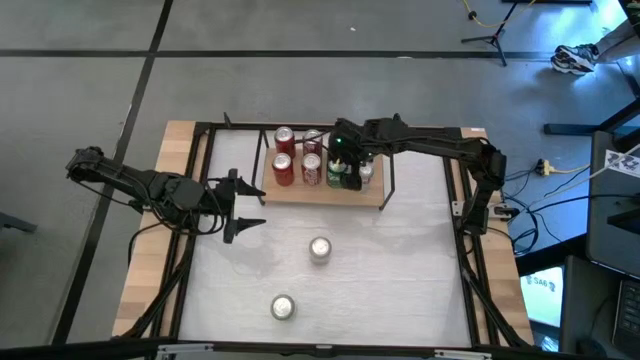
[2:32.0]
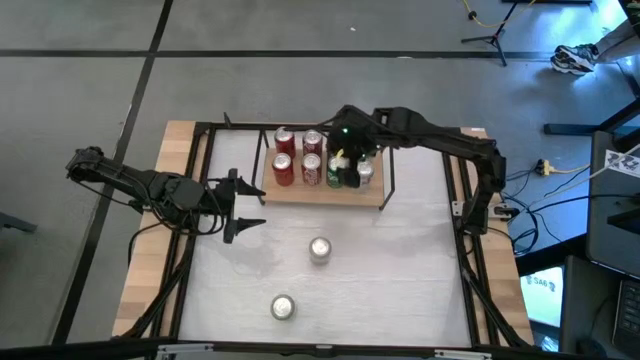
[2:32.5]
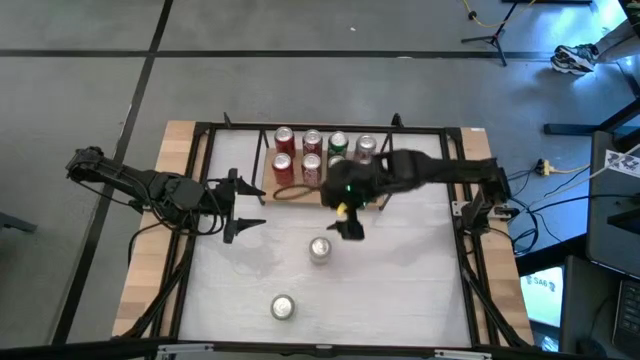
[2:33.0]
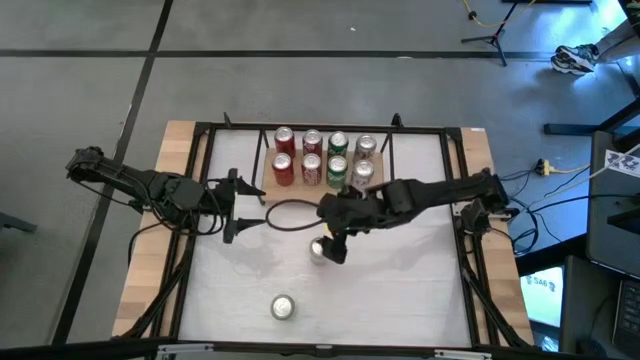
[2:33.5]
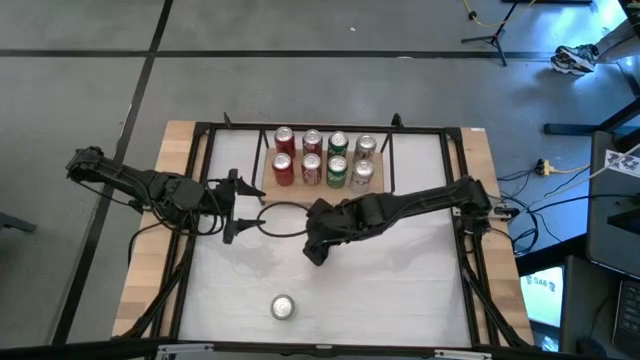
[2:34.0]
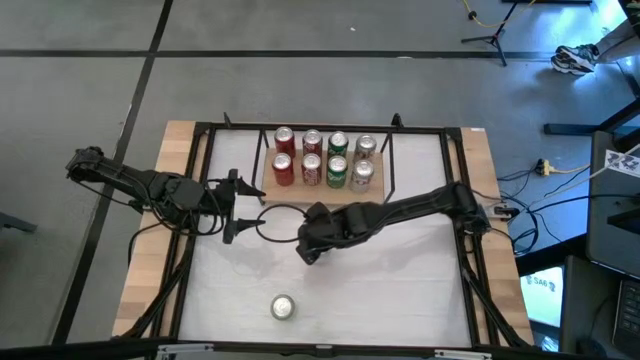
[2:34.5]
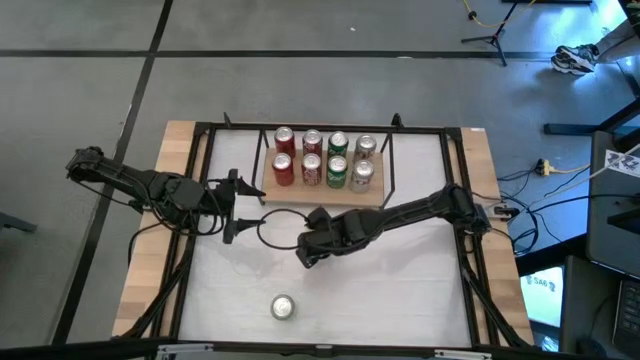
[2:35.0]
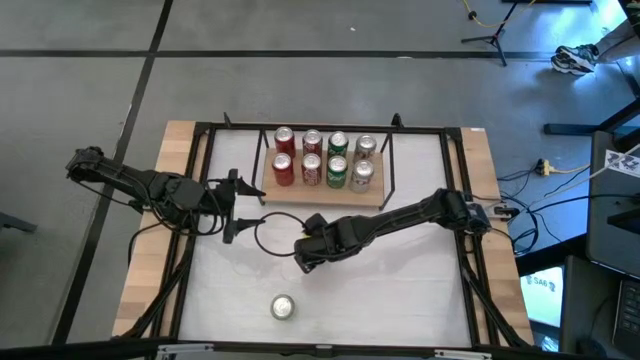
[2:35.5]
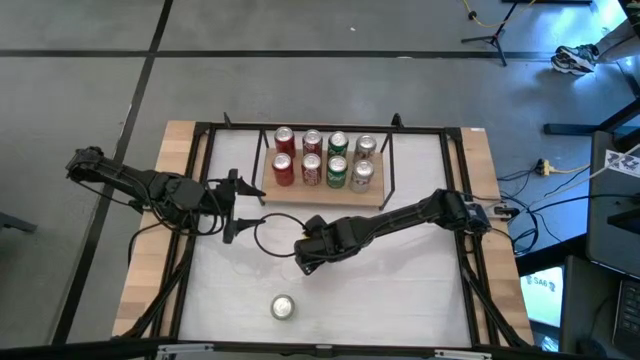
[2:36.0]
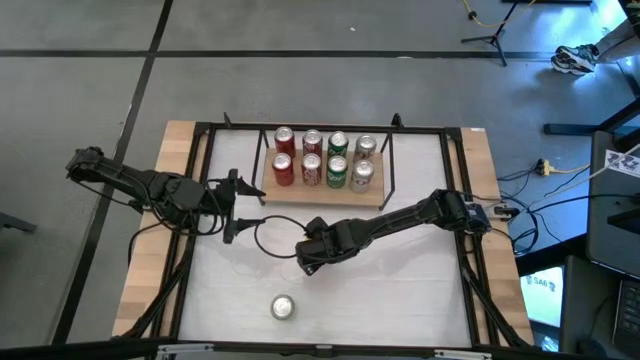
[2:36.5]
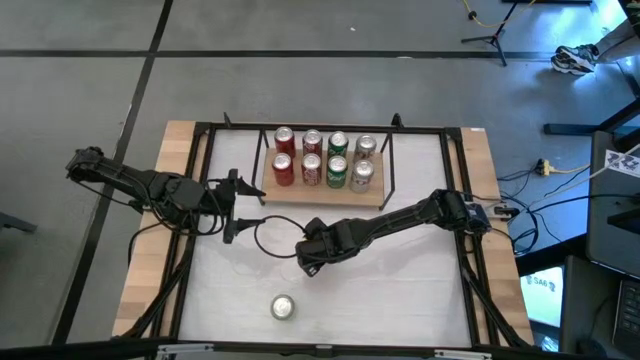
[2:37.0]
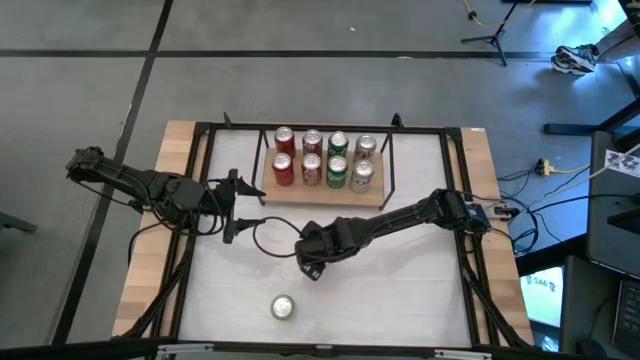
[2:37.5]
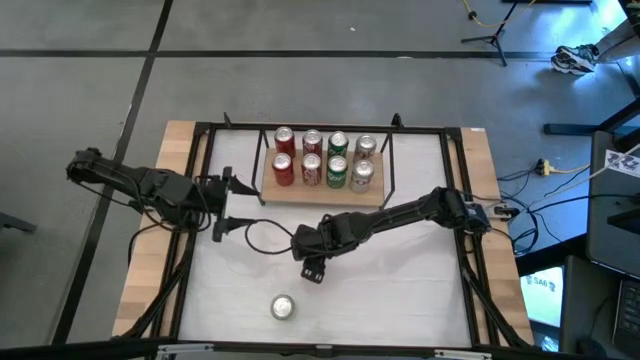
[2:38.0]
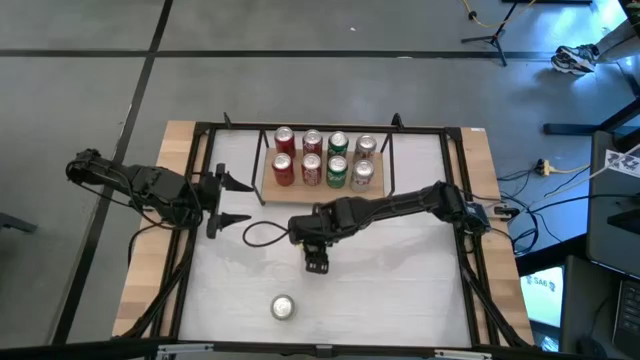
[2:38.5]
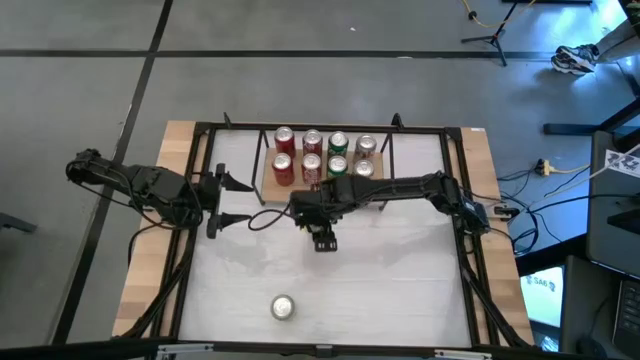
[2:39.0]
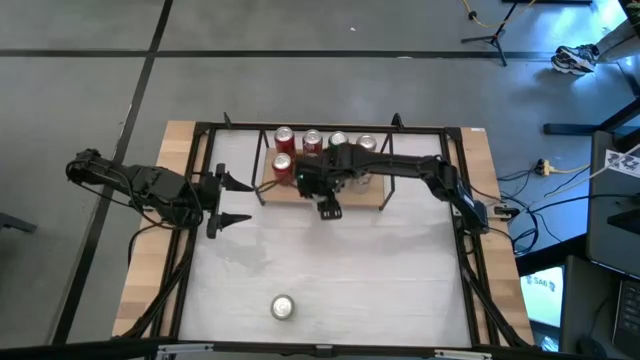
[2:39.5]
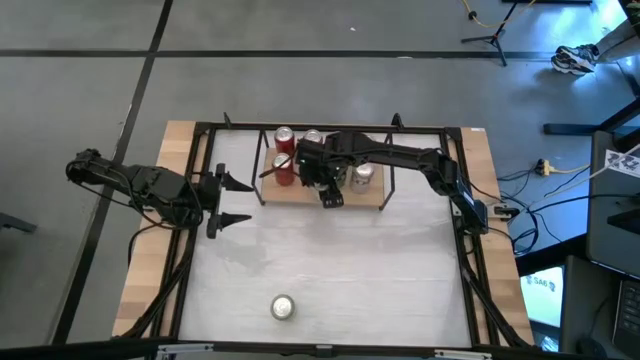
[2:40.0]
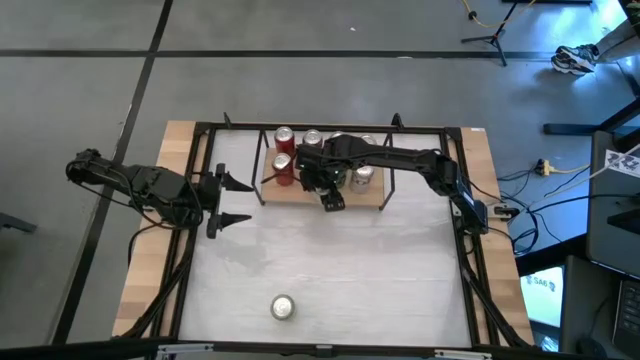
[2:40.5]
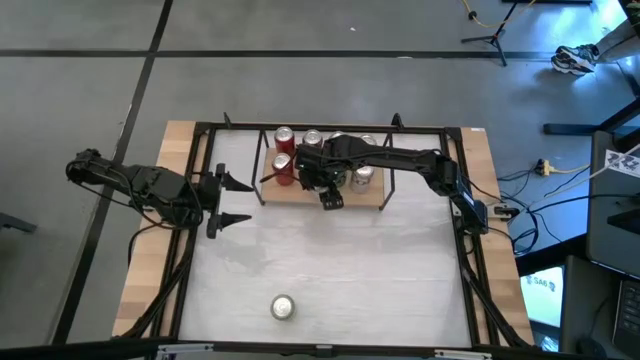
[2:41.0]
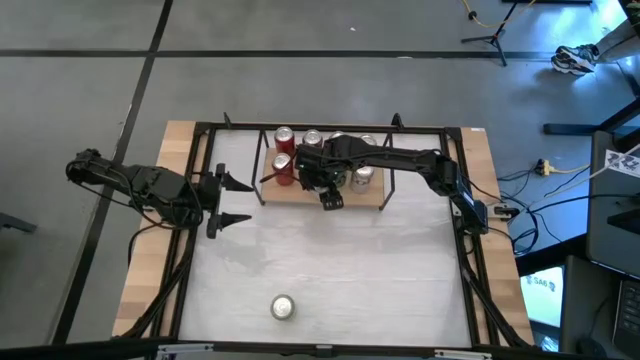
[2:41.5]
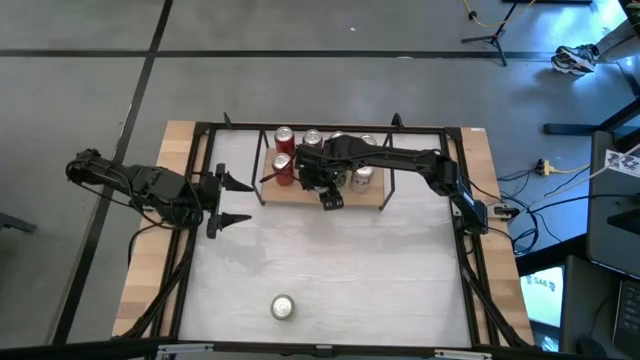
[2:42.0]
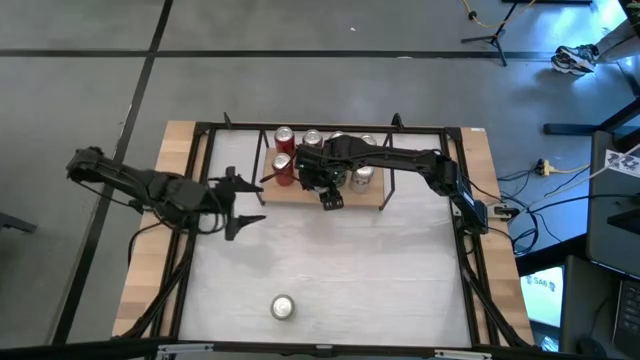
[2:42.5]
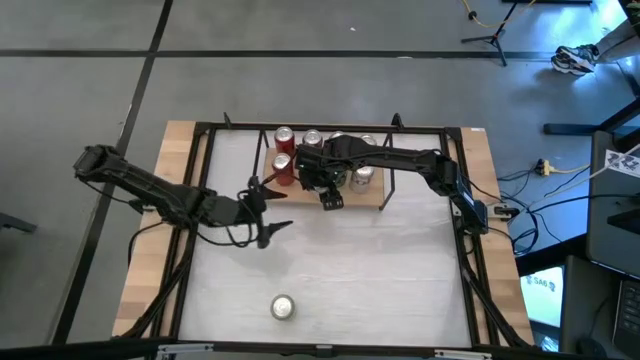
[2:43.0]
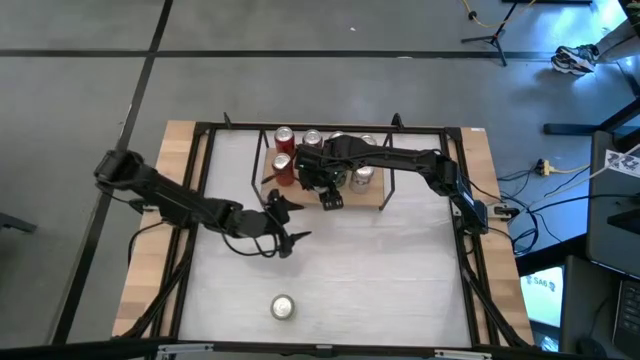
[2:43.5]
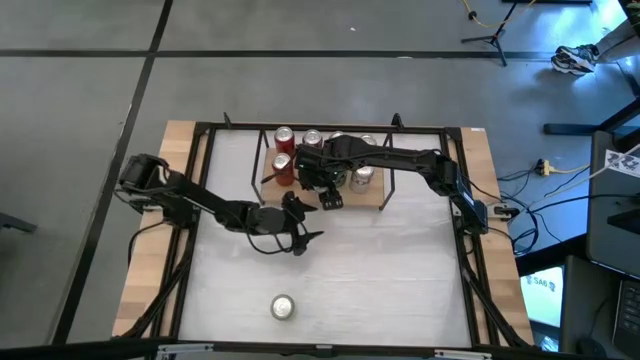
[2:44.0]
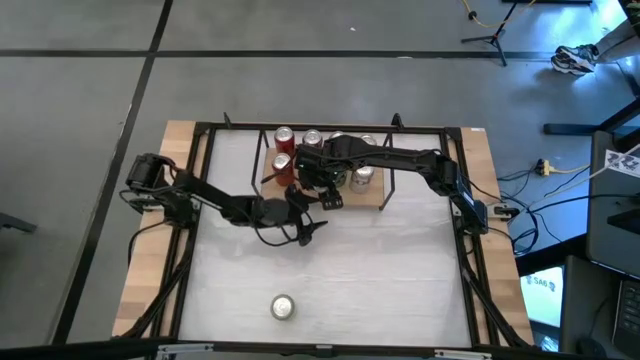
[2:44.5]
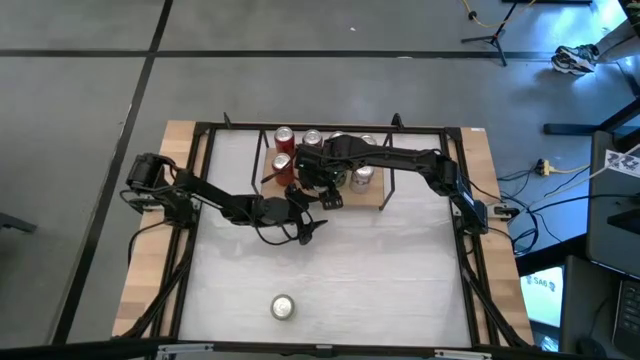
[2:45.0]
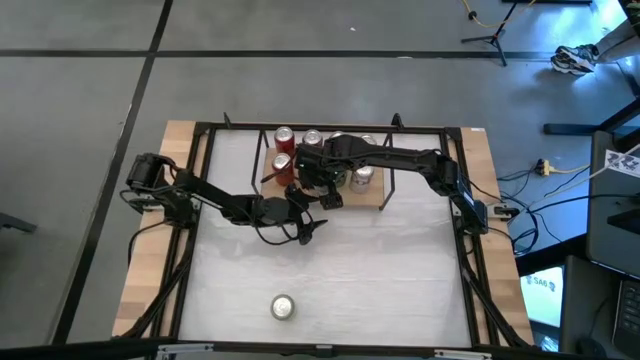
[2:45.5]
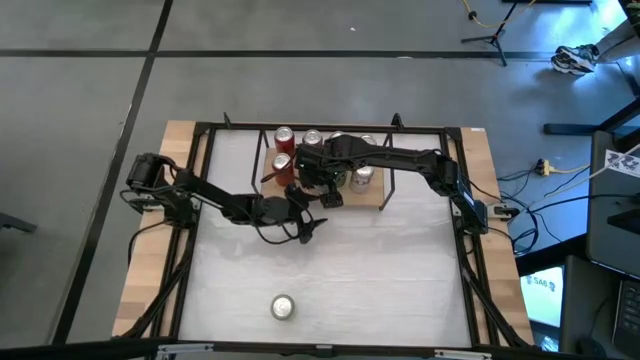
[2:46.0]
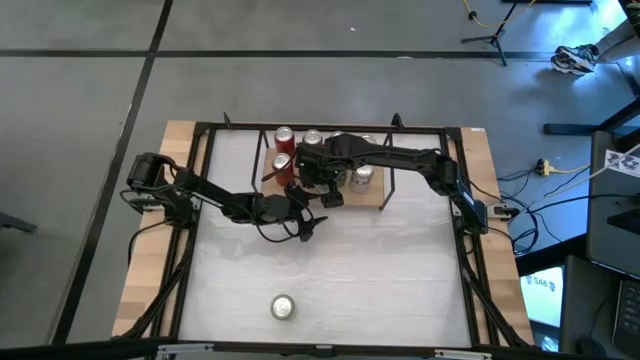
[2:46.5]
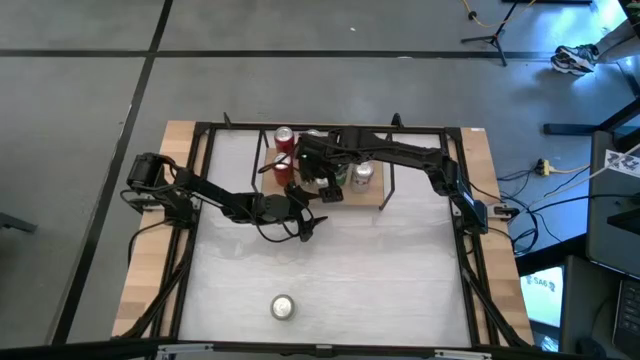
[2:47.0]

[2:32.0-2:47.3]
Task: Place canned beverage on shelf
Put the pink soda can on the shelf

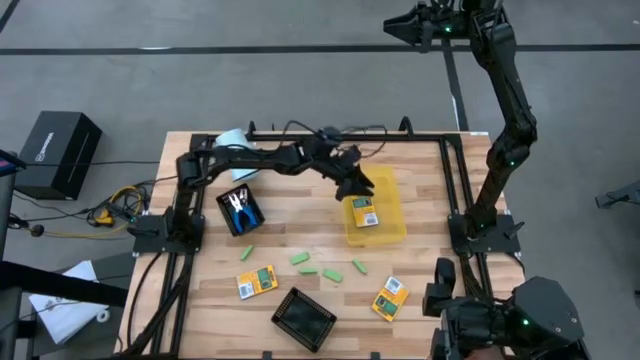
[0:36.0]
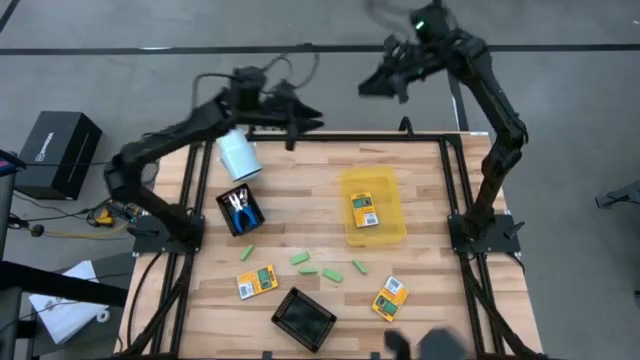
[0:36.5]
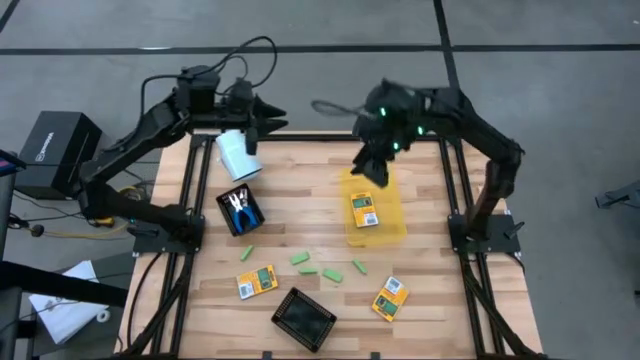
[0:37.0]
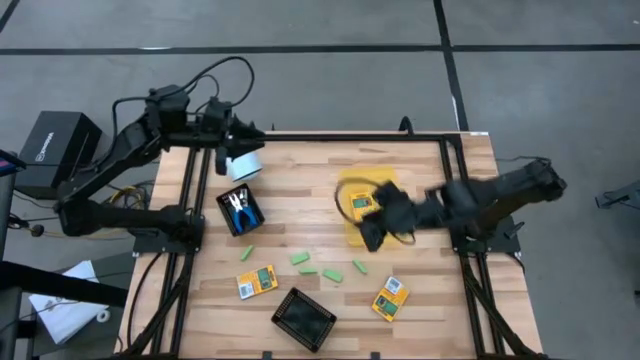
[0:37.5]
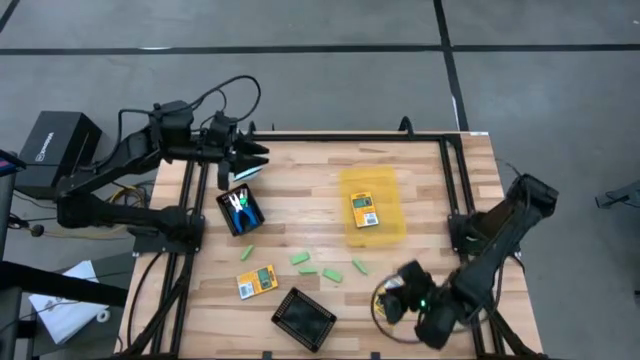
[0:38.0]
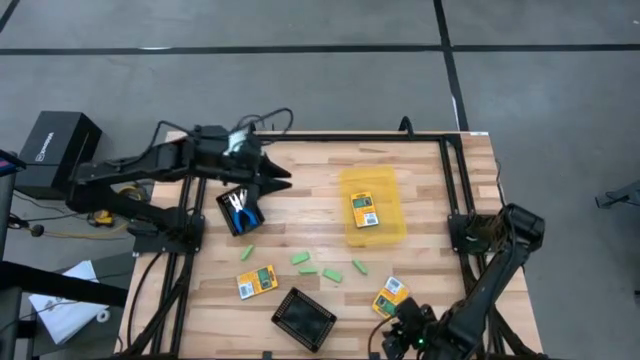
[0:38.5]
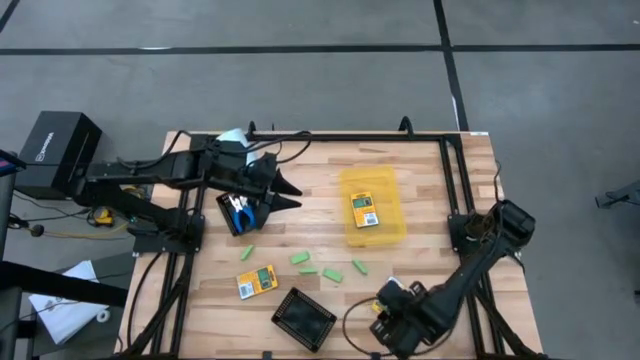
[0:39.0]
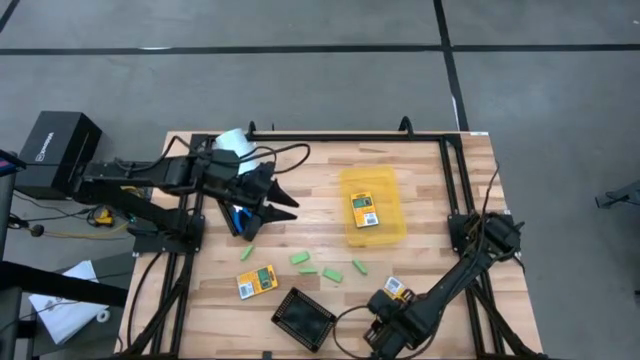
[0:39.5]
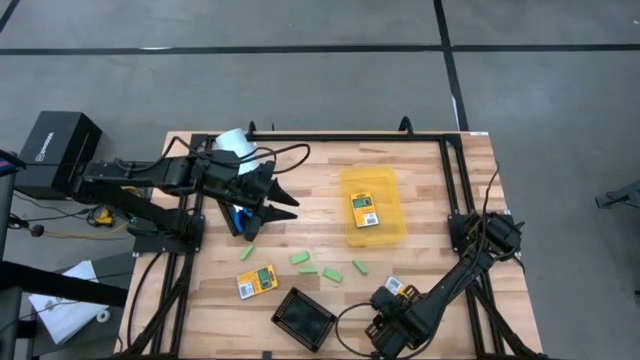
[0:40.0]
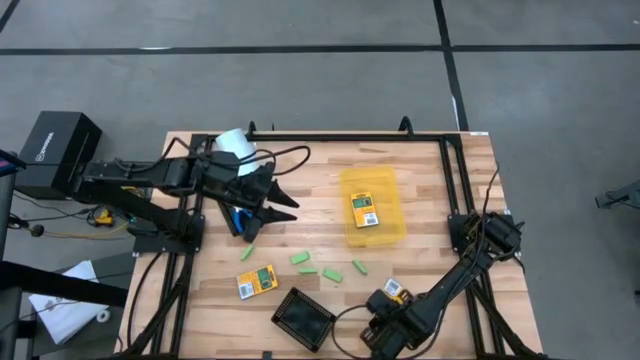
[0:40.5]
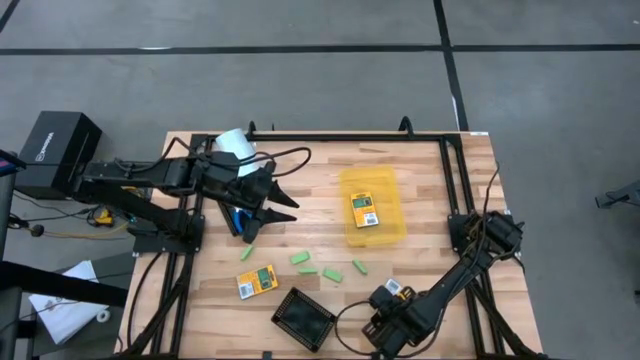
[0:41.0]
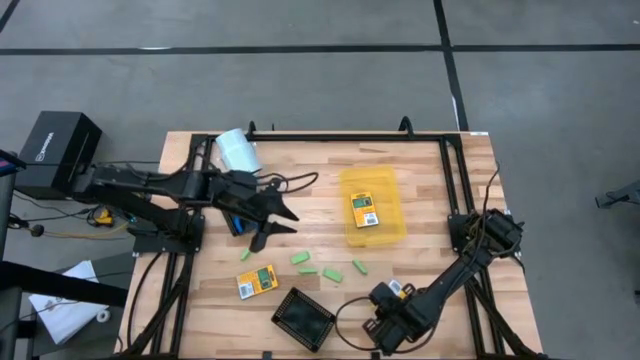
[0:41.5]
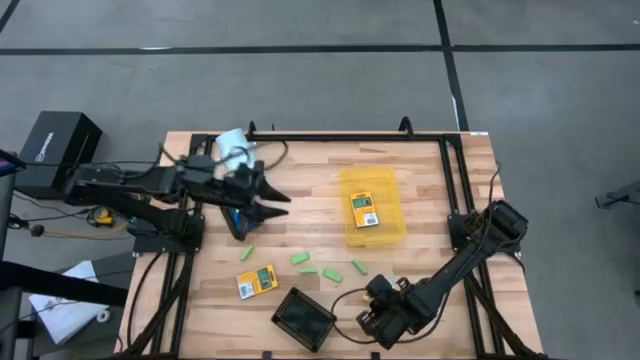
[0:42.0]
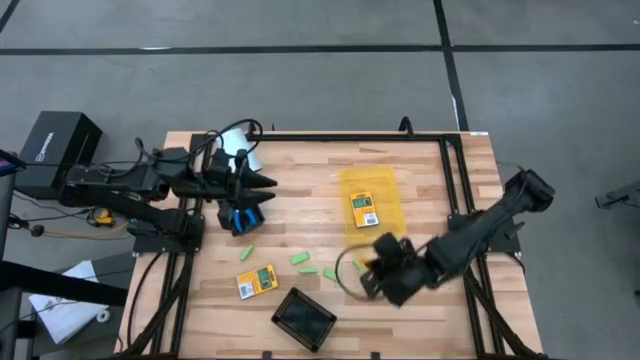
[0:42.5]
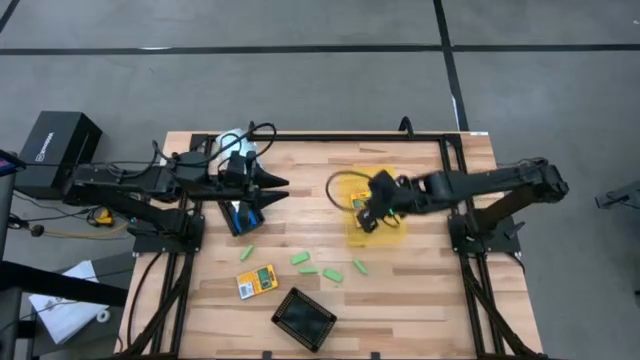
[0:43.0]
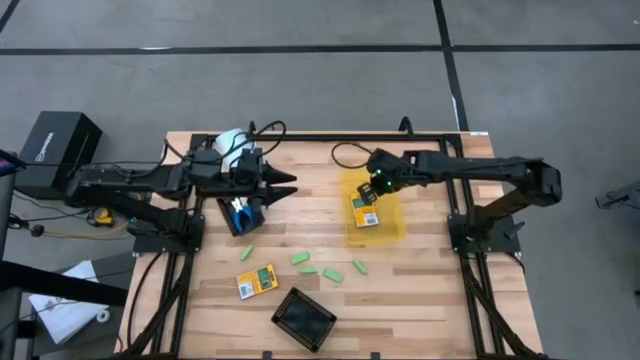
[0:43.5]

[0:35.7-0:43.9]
Task: Pick & Place School Supplies
Put the right crayon box into the yellow bin
